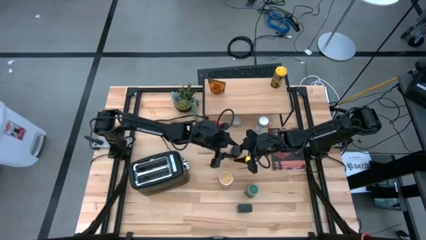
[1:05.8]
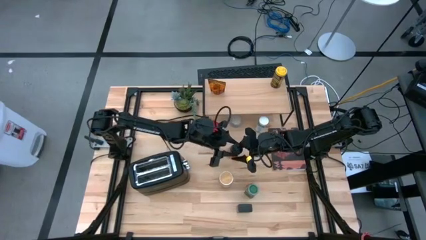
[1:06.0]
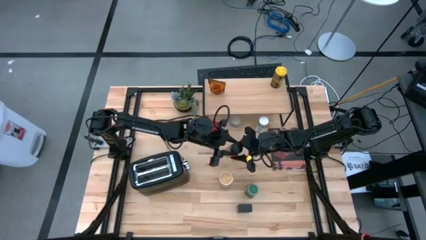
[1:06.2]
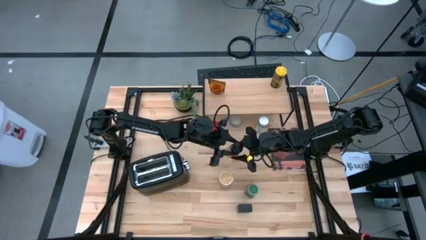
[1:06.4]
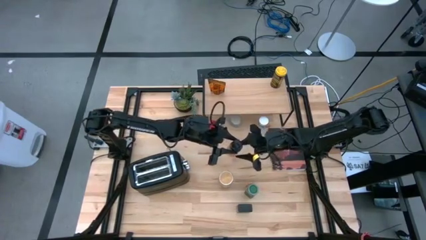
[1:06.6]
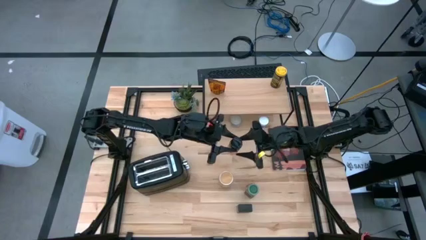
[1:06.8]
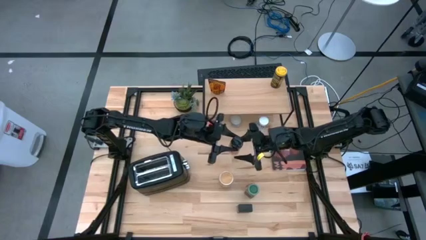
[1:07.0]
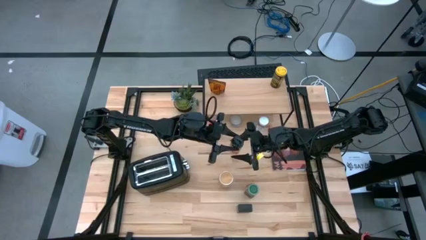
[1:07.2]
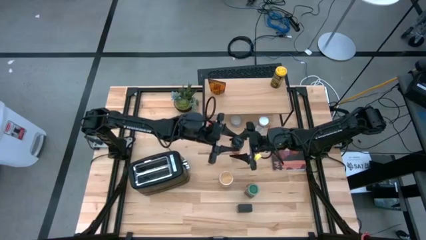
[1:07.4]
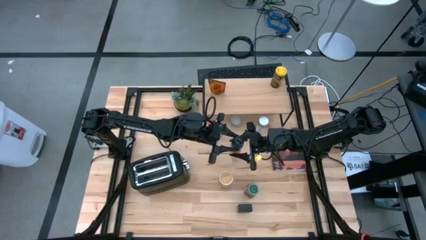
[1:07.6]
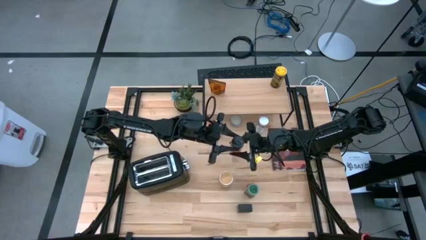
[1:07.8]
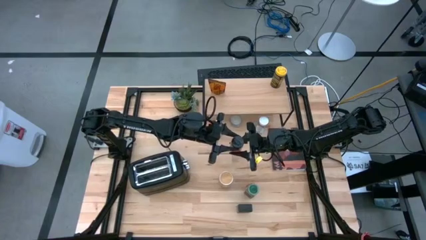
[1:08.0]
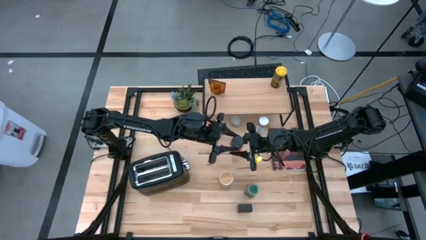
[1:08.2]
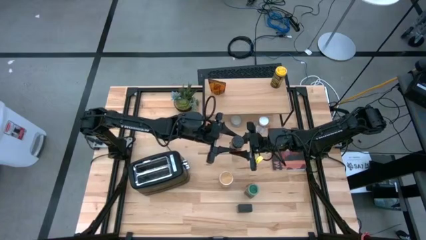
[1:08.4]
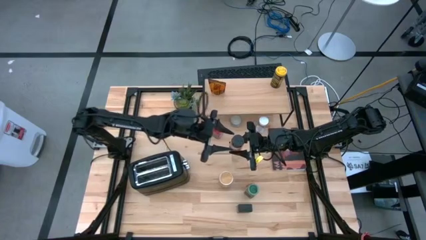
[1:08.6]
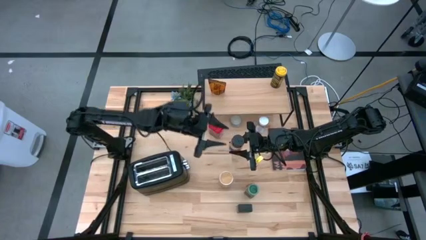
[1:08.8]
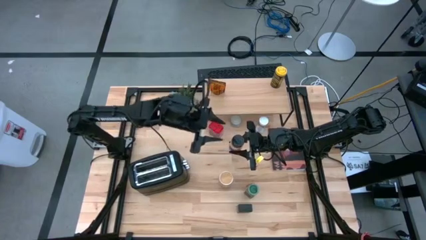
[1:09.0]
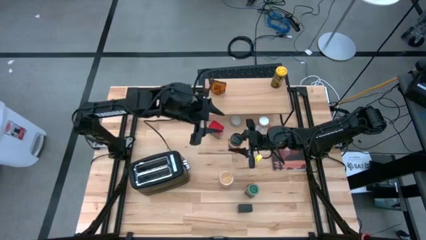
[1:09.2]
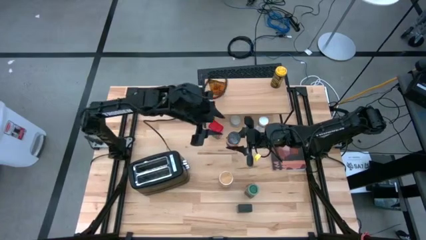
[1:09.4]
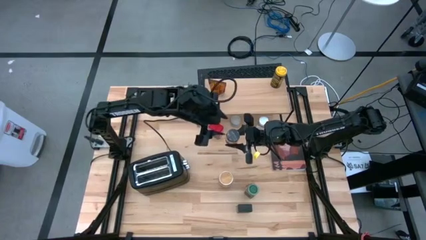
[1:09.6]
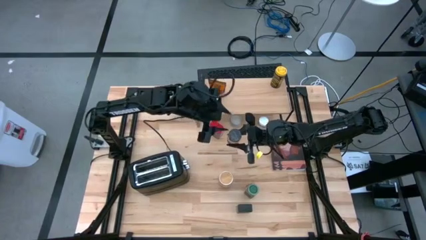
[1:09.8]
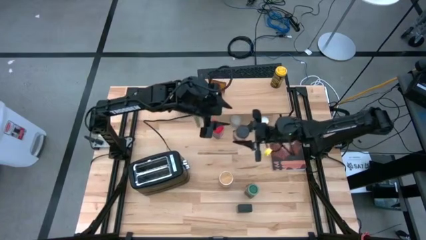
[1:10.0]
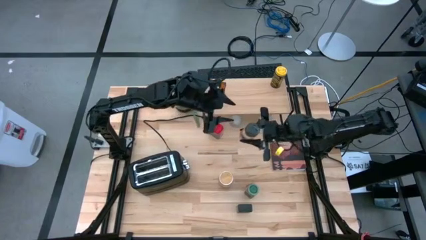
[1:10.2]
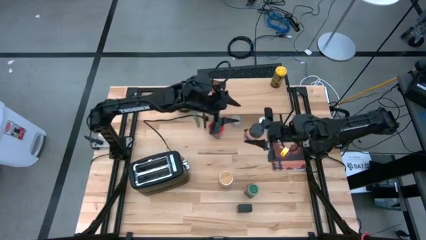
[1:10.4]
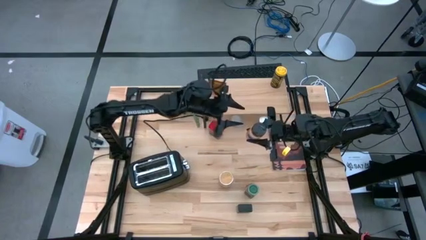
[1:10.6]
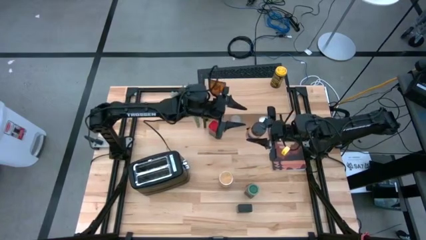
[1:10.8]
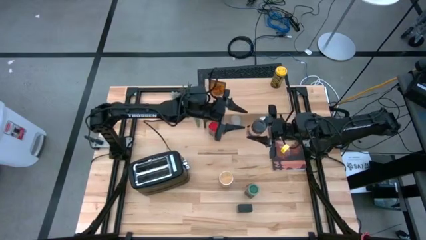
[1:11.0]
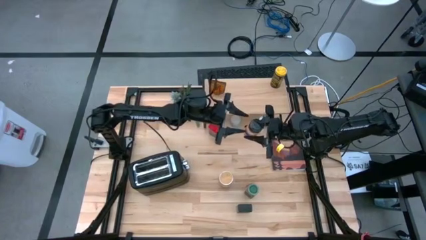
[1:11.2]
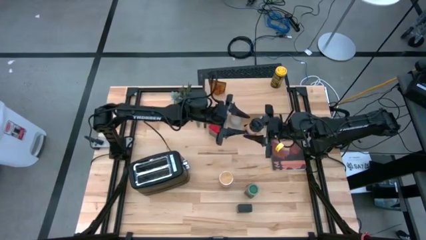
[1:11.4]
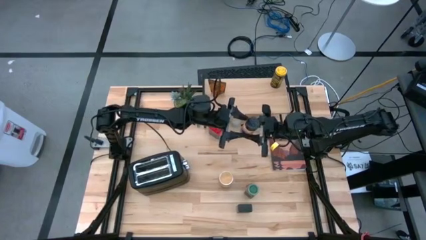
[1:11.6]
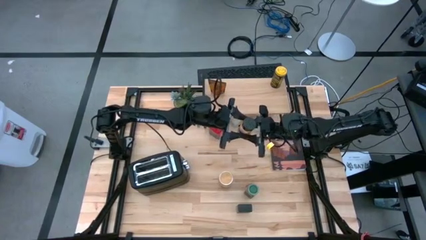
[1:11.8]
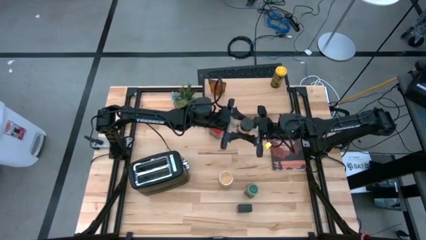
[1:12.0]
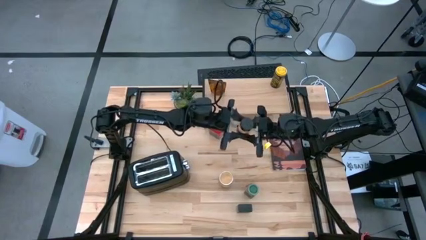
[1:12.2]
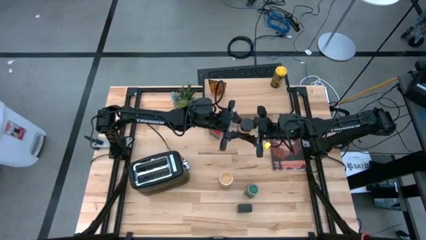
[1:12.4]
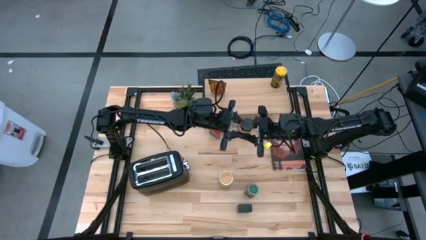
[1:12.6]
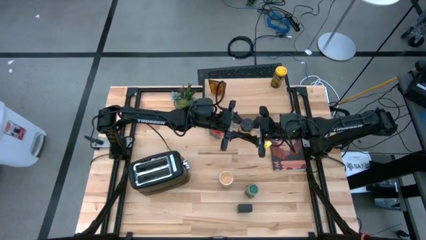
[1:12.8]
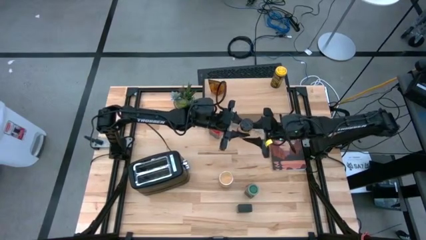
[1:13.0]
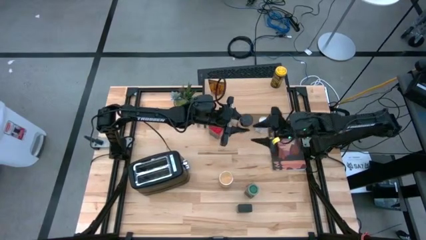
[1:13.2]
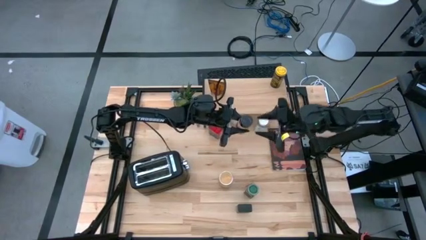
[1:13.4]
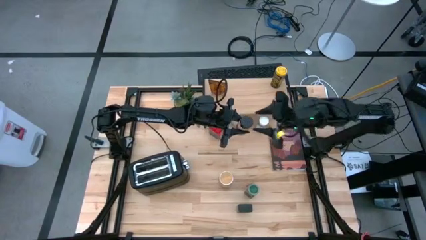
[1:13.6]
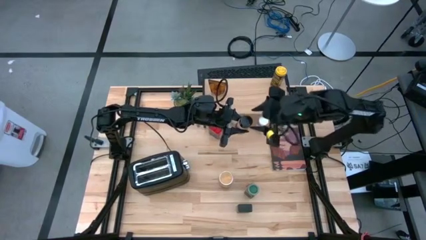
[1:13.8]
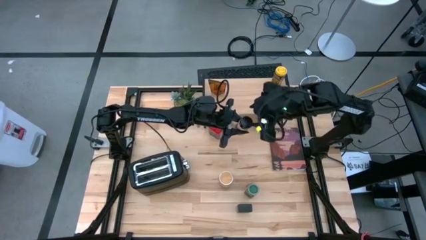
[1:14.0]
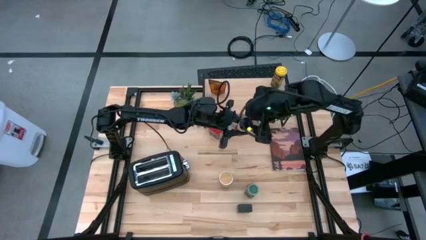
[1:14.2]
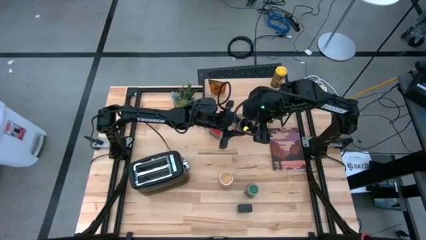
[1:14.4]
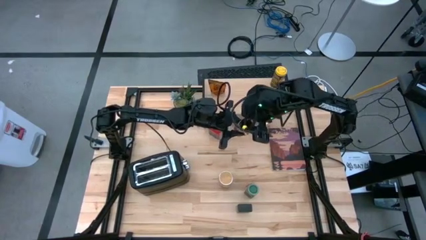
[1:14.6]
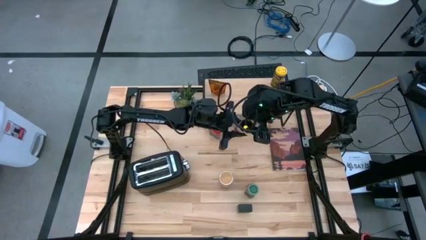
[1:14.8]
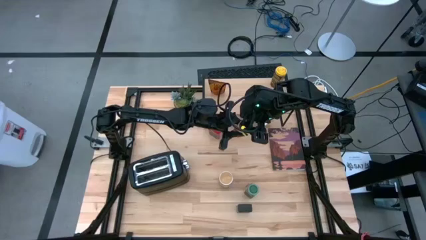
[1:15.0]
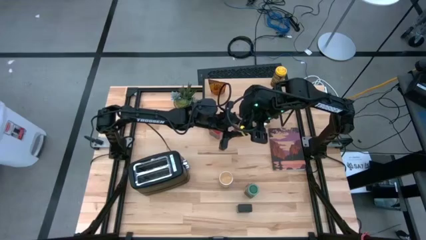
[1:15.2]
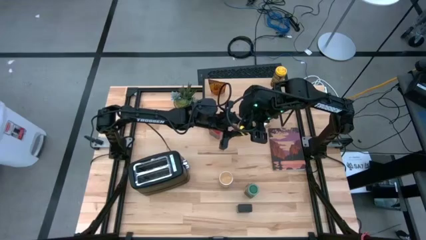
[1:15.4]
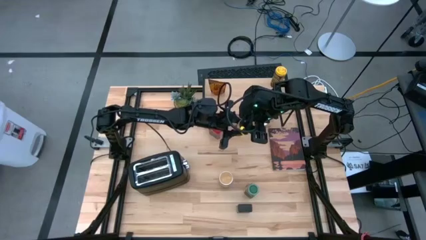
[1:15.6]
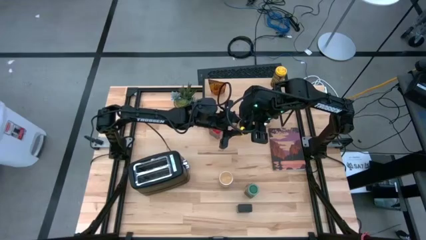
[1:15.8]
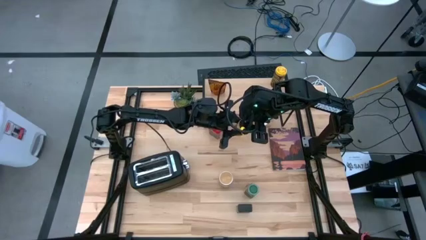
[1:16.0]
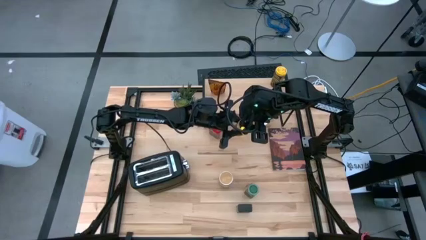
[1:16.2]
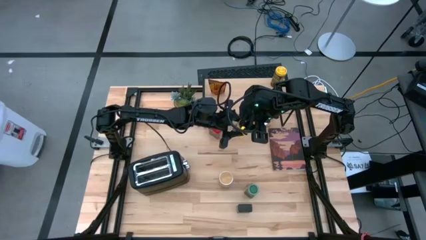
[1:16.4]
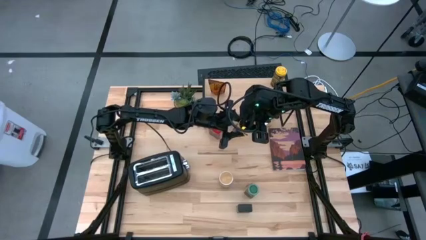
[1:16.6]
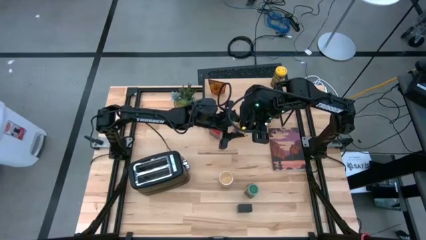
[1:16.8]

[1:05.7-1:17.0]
Task: Shelf spices
Put the black seasoning bottle on the shelf

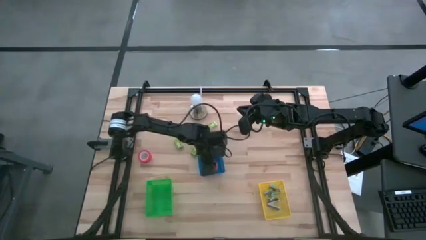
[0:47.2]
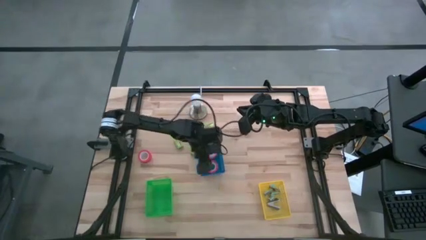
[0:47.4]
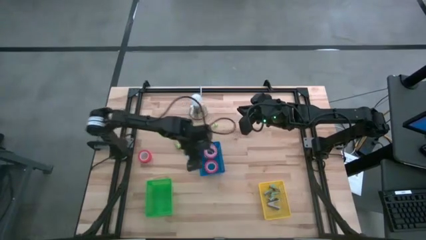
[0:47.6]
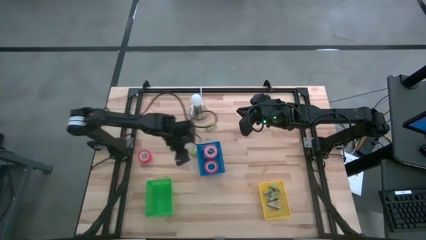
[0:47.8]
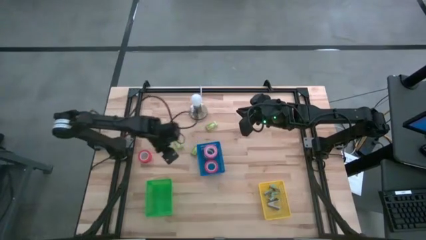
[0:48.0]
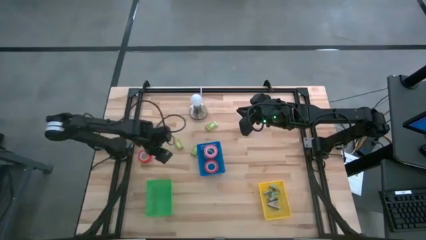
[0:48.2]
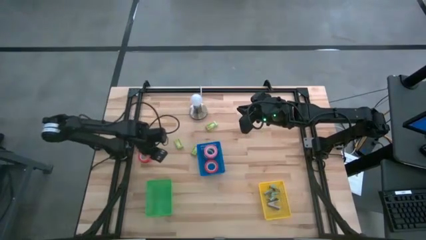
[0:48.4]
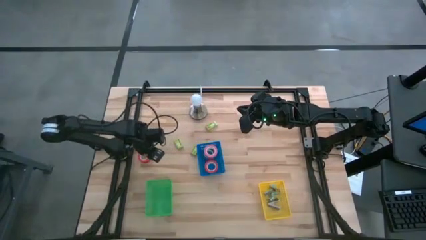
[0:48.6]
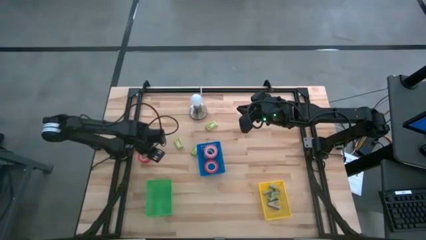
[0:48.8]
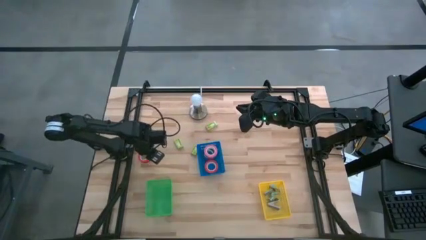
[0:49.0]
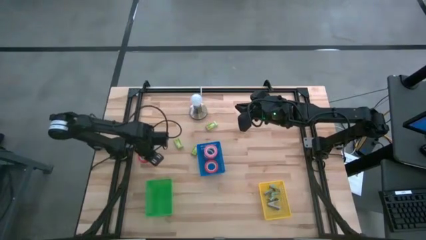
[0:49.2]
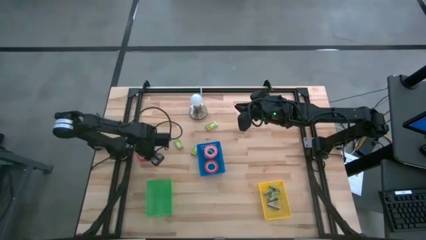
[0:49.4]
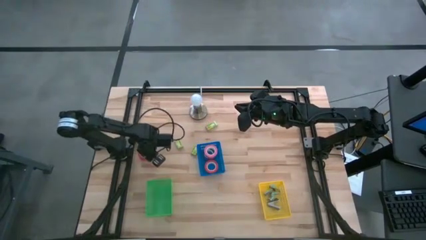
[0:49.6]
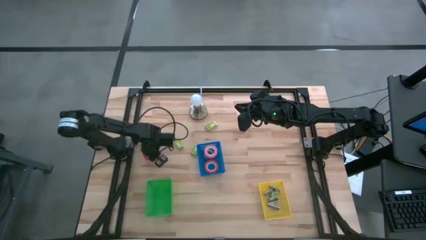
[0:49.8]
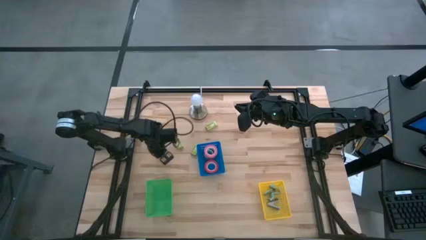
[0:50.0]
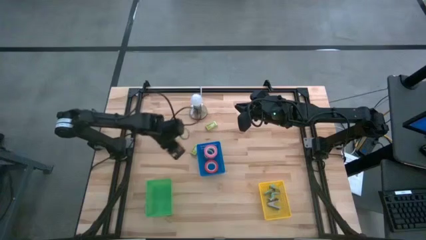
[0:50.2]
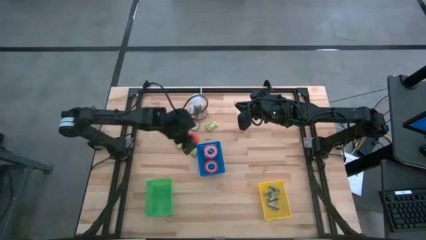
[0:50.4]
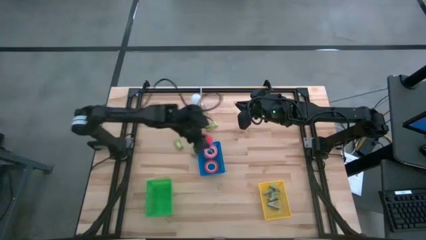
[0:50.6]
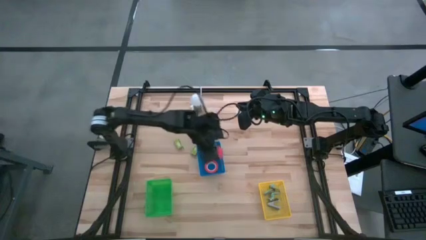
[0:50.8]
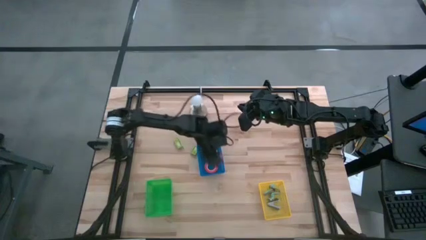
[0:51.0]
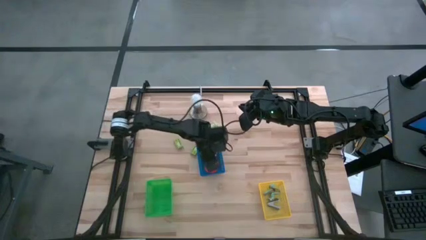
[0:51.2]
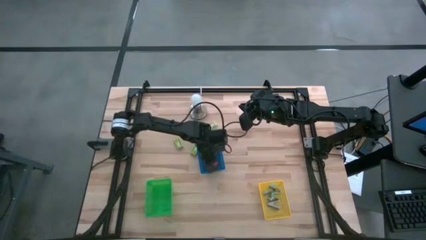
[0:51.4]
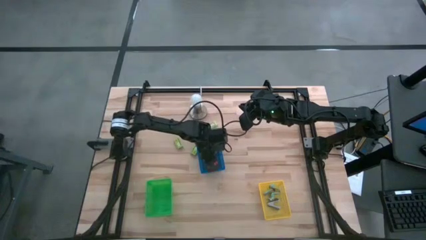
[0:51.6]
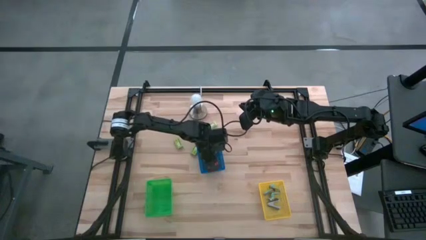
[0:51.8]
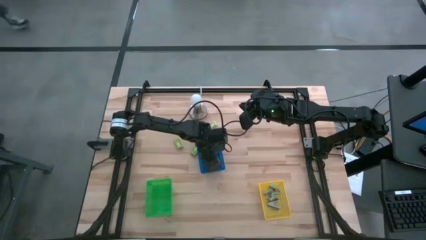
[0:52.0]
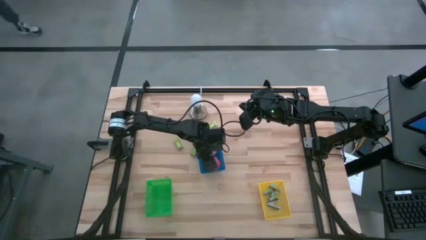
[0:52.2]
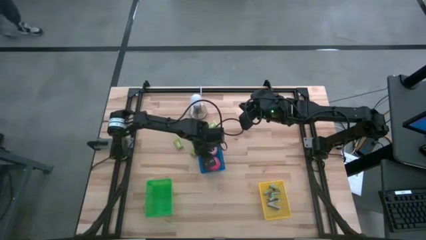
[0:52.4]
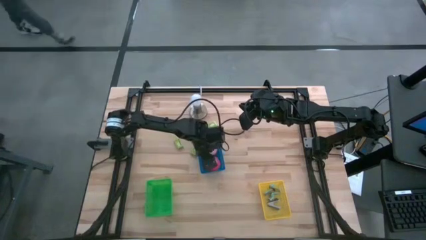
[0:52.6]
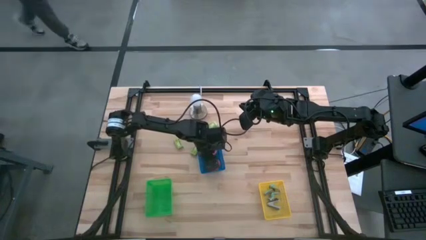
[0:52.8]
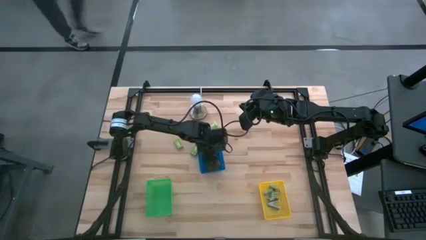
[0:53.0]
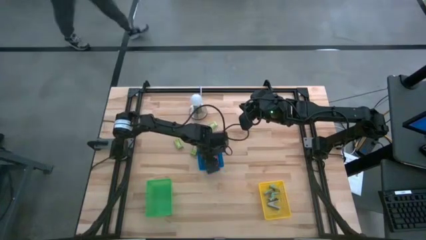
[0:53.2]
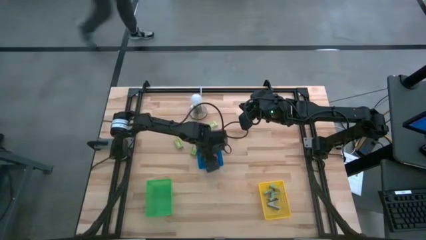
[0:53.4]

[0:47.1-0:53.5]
Task: Pick and place Stapler, Stapler remover, tape
Put the orange tape into the blue bin
